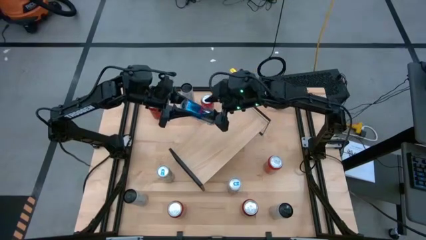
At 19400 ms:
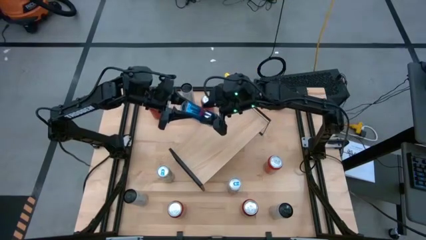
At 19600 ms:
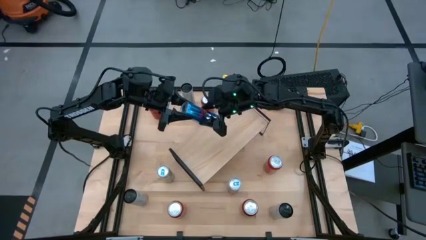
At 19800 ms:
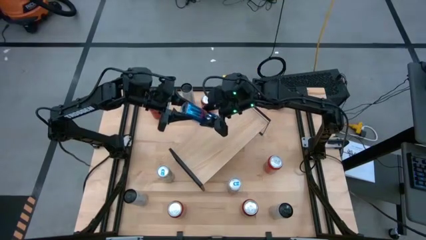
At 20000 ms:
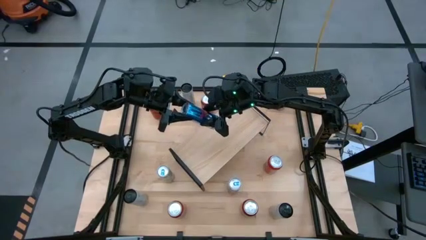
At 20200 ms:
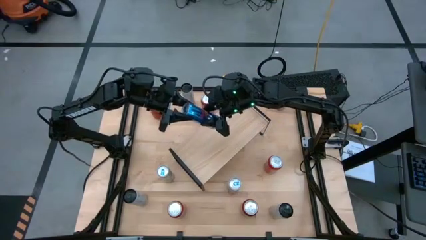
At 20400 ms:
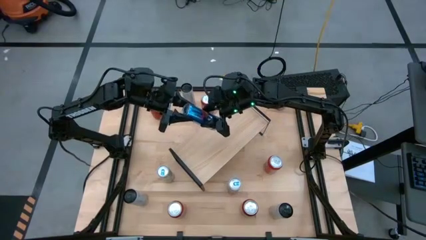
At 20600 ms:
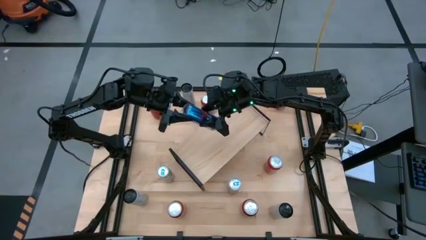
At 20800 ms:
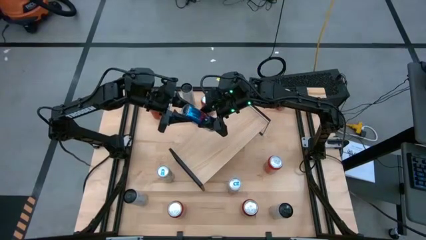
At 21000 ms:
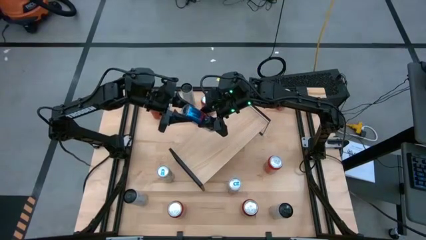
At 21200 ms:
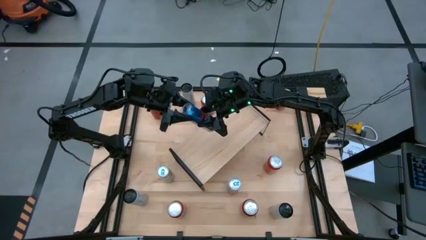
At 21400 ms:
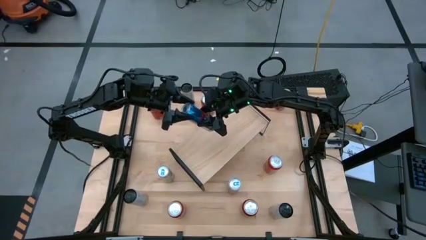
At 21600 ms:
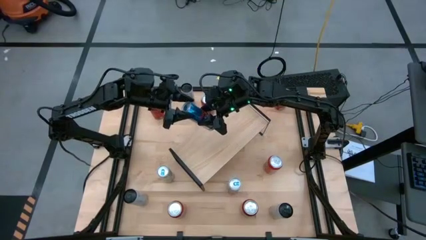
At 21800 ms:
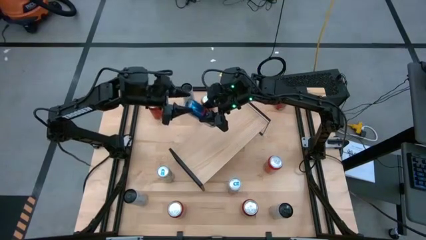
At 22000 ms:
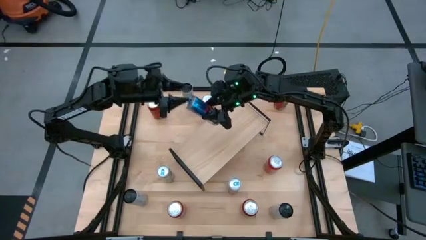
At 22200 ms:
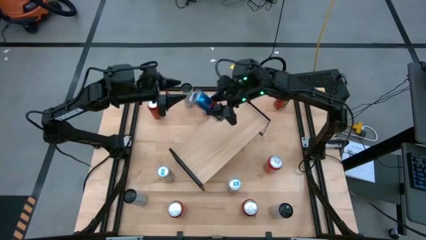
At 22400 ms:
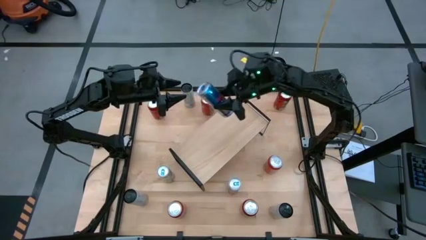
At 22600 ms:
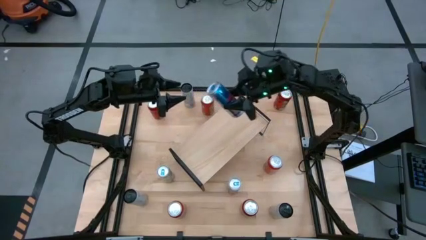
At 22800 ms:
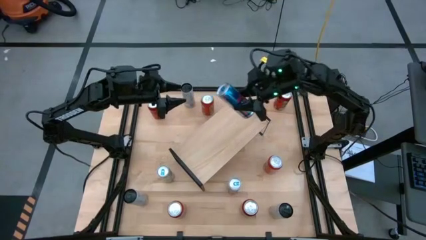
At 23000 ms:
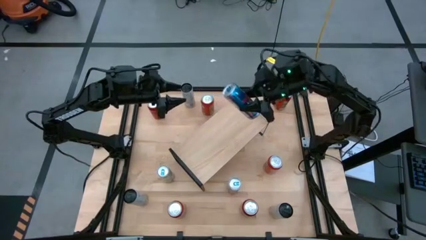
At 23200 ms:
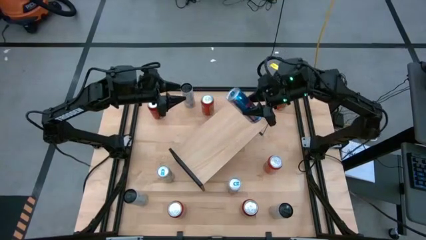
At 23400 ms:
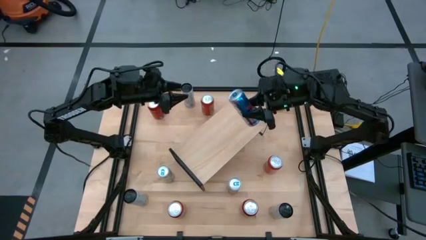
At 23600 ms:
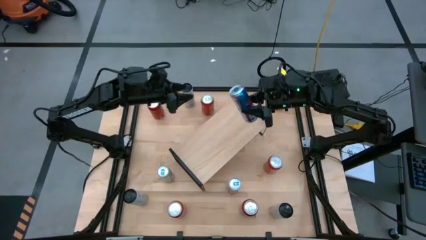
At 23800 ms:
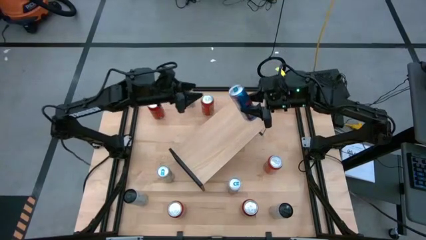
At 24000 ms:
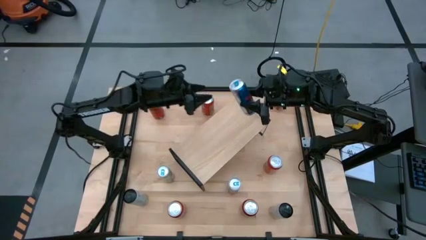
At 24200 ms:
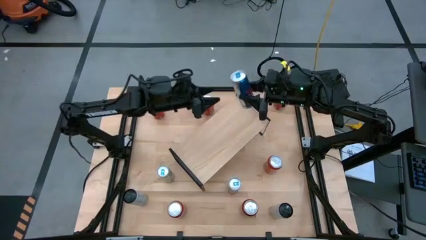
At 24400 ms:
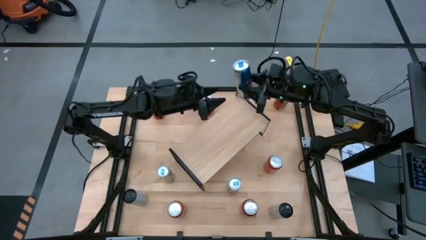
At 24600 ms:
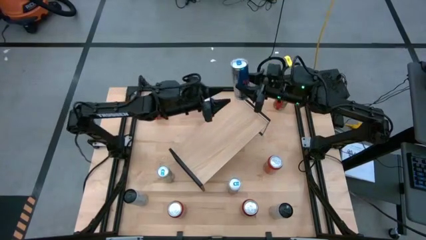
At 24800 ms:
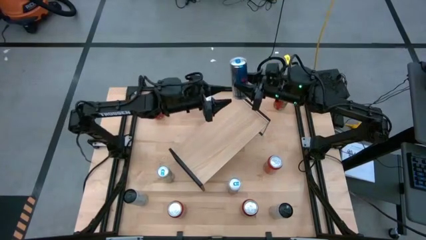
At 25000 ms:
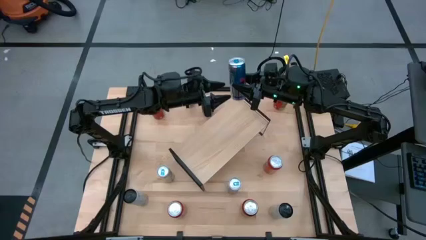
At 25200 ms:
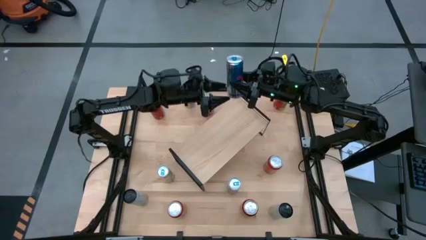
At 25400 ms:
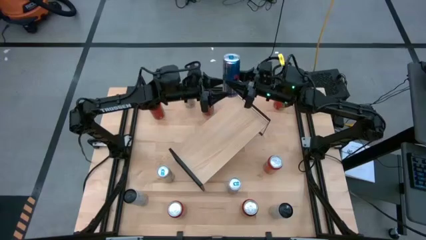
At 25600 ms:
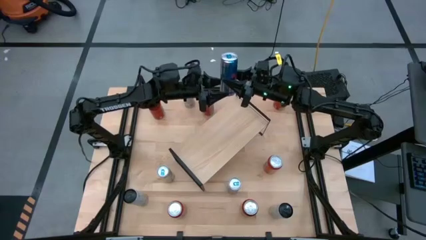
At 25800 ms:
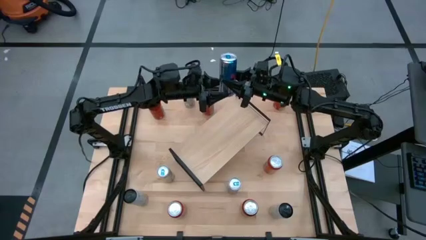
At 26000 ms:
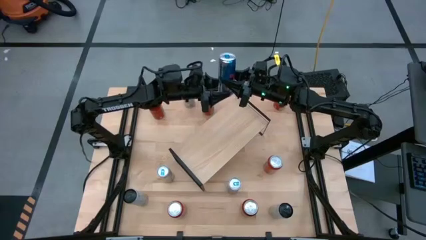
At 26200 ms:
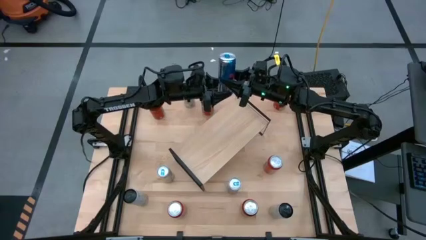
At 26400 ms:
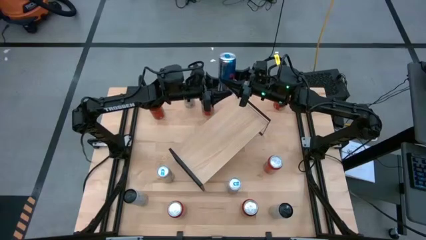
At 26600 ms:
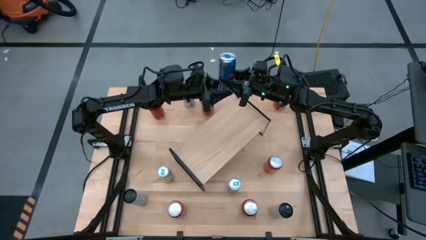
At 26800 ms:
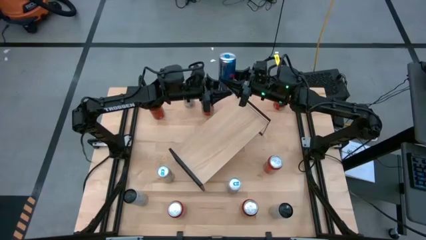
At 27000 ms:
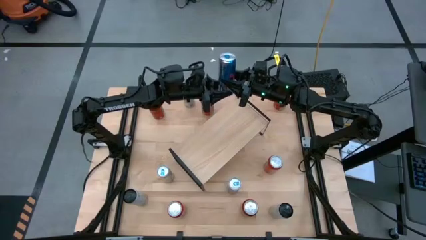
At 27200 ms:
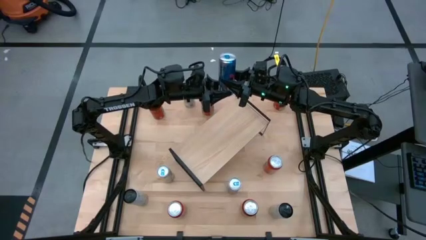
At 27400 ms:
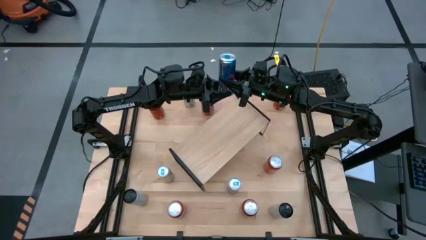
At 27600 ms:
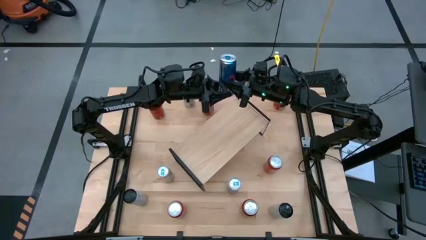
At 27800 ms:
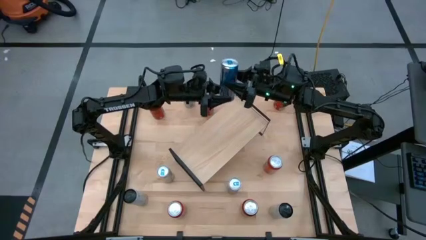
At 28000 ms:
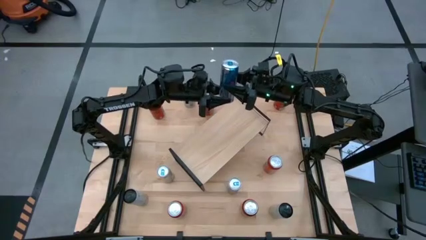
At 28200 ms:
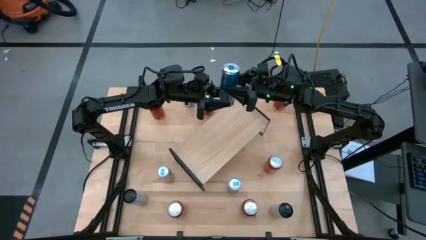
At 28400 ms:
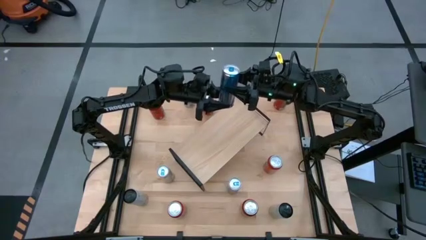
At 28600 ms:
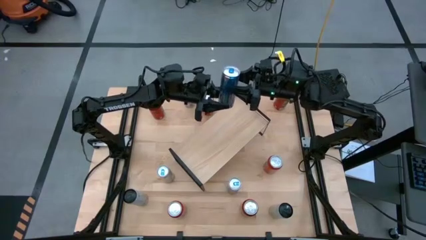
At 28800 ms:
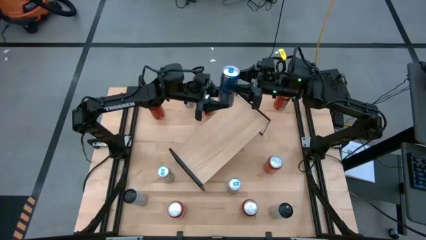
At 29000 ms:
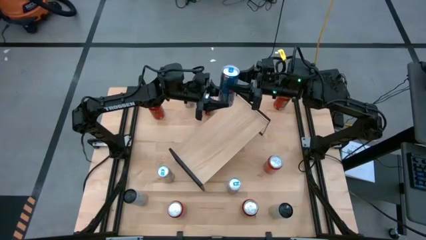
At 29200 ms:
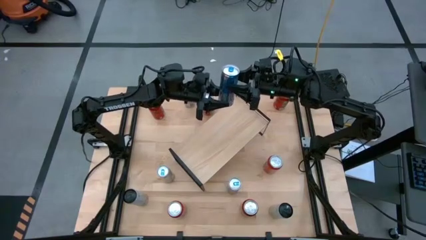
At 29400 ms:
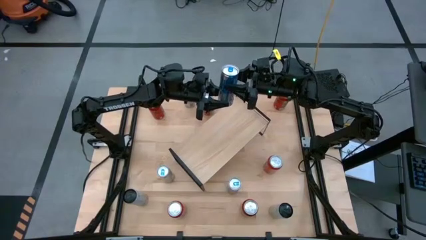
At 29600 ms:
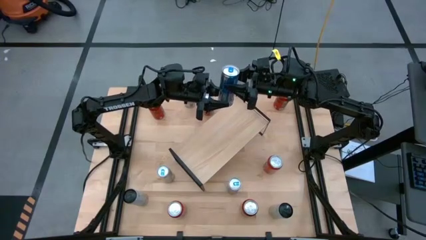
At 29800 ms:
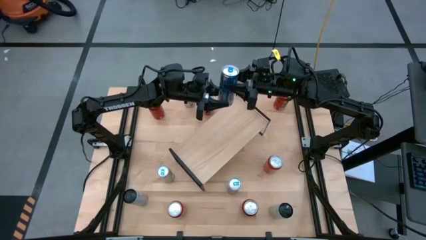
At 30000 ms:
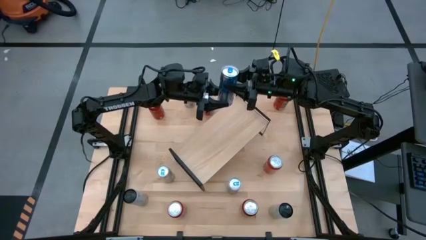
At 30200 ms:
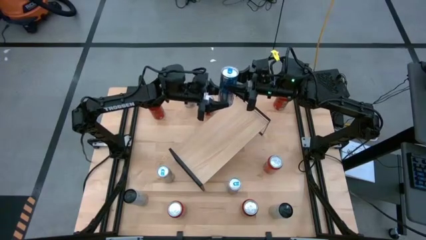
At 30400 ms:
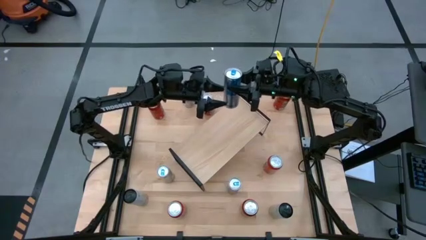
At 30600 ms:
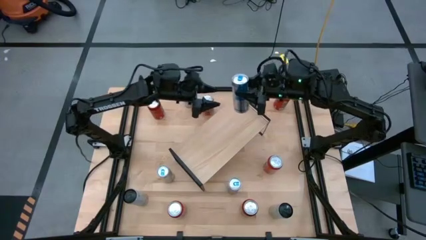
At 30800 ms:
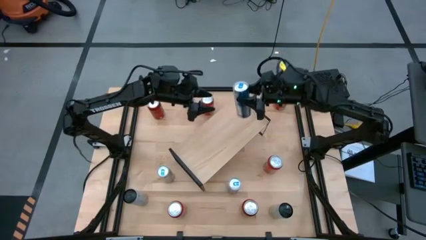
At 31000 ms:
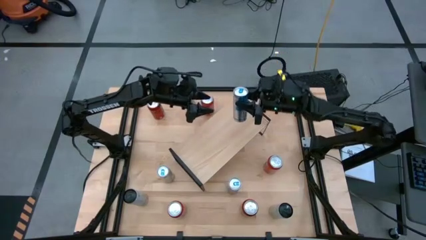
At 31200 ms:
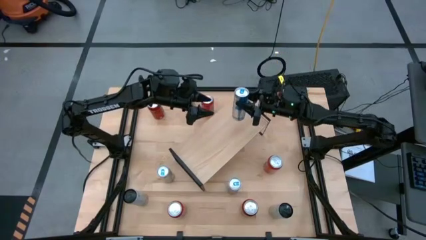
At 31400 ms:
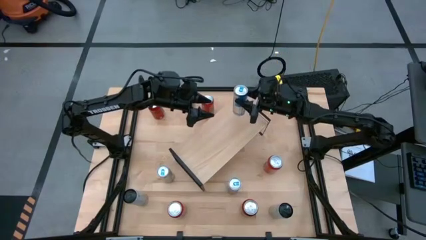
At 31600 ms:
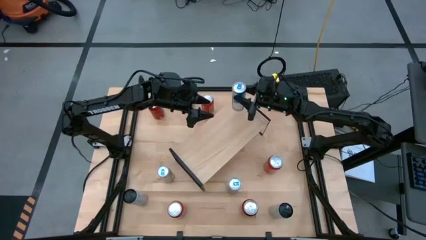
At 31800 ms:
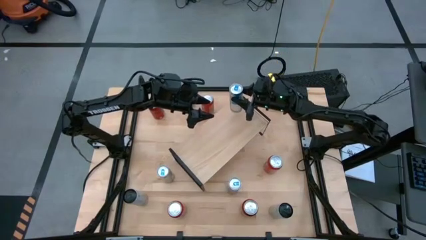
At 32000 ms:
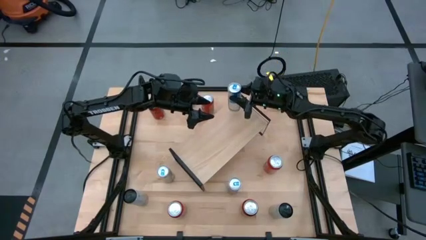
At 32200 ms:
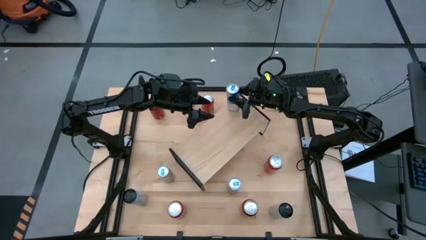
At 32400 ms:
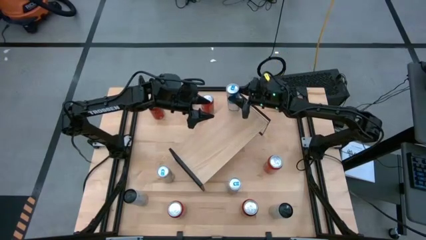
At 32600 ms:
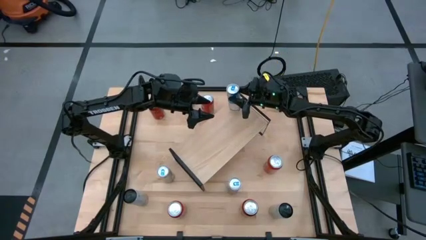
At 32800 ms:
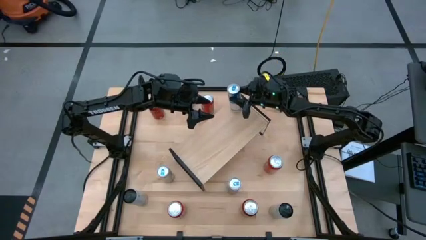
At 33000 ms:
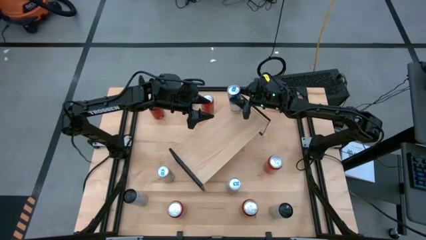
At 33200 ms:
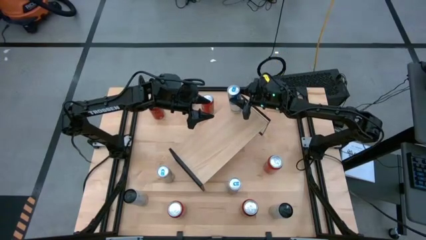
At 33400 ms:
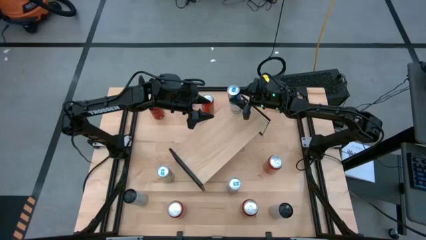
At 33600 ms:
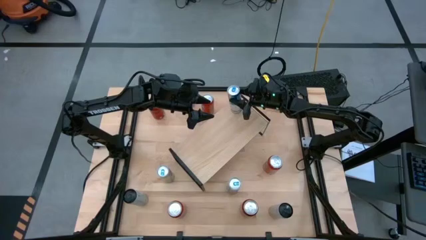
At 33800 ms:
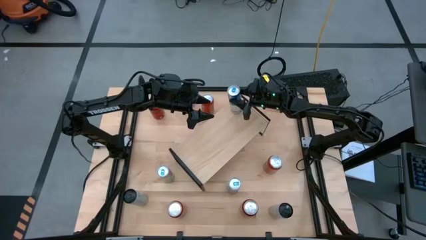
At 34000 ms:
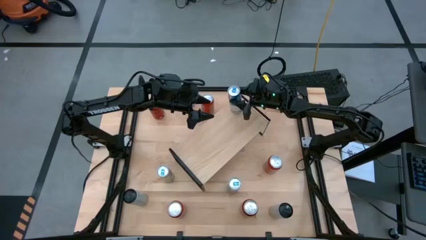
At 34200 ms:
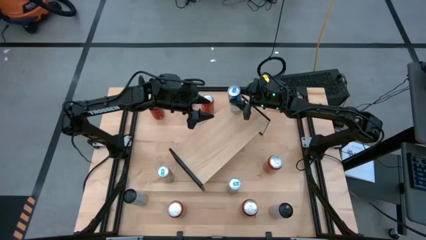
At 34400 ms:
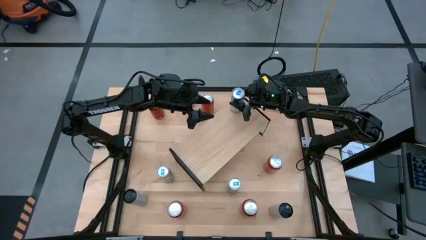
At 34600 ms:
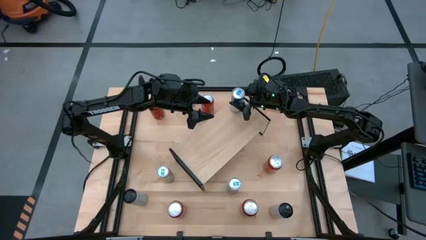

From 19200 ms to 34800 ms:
Task: Place canned beverage on shelf
Put the top blue soda can on the shelf
